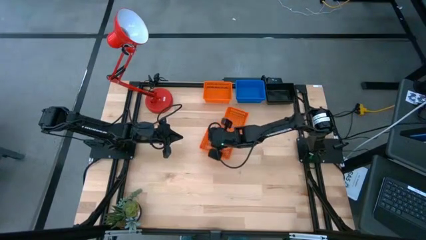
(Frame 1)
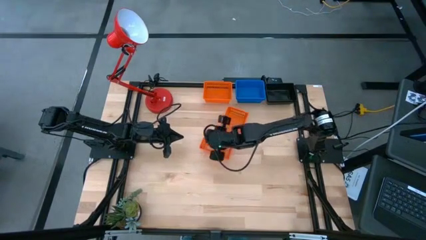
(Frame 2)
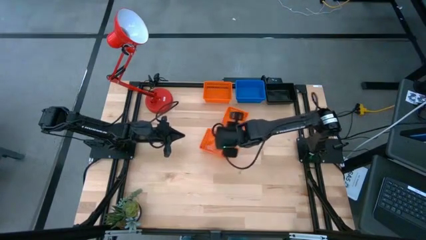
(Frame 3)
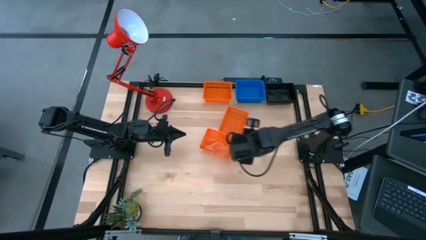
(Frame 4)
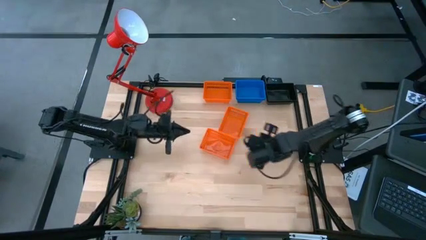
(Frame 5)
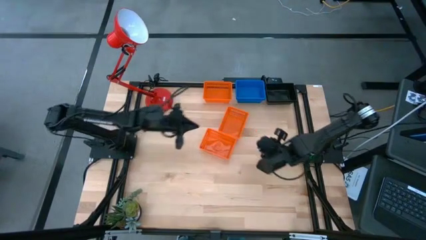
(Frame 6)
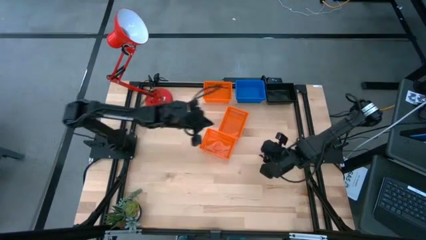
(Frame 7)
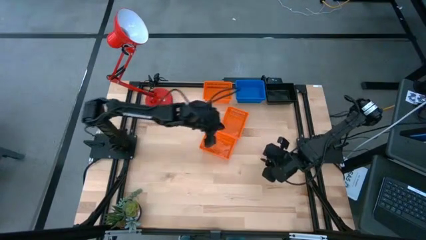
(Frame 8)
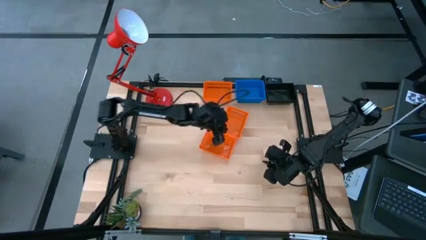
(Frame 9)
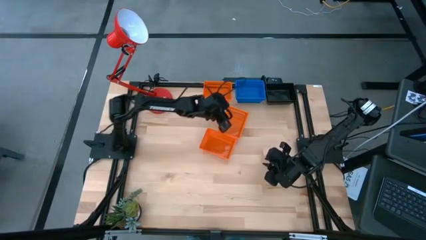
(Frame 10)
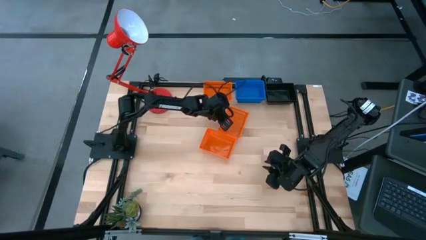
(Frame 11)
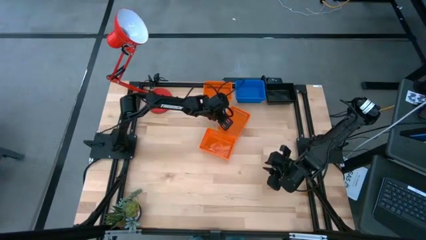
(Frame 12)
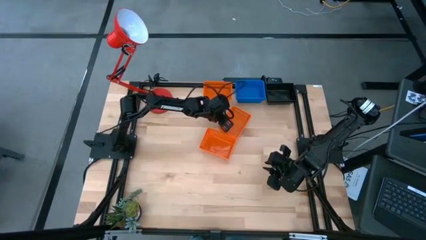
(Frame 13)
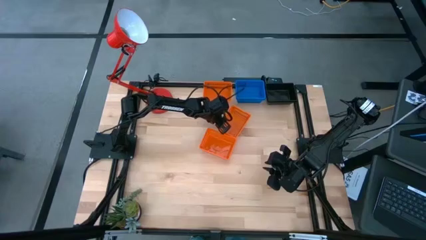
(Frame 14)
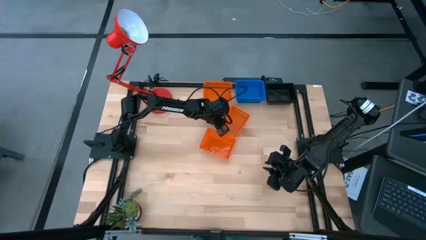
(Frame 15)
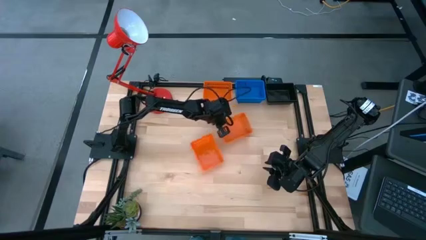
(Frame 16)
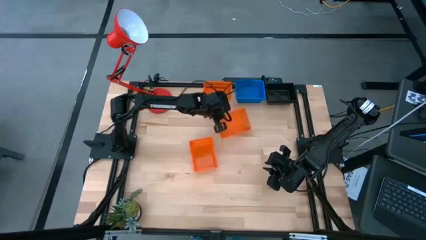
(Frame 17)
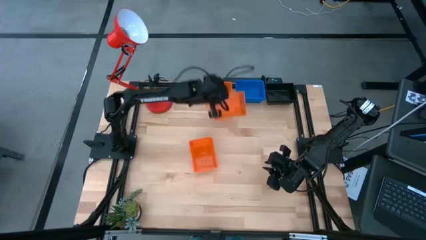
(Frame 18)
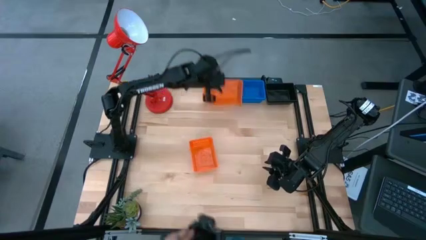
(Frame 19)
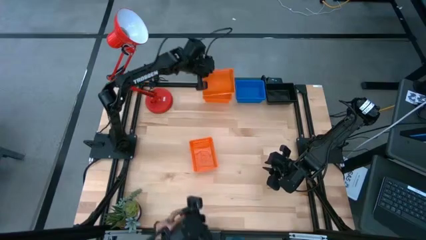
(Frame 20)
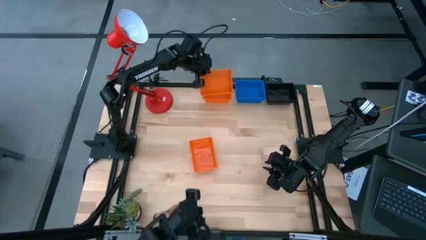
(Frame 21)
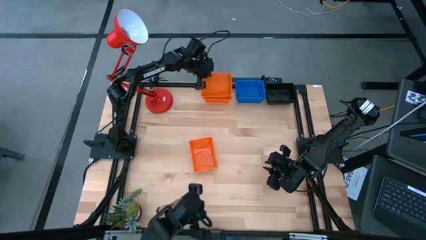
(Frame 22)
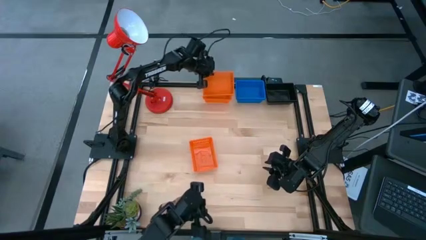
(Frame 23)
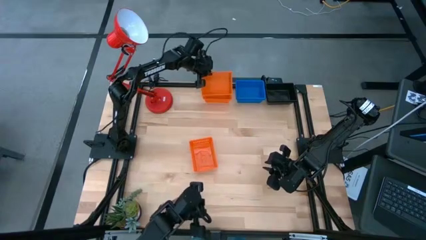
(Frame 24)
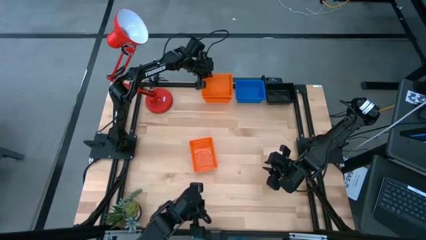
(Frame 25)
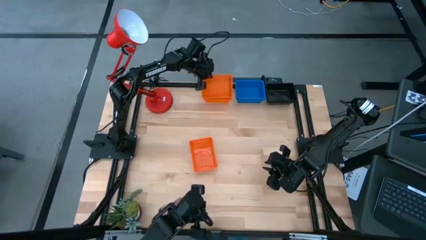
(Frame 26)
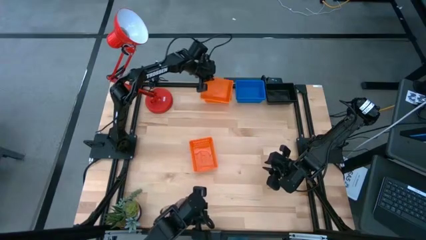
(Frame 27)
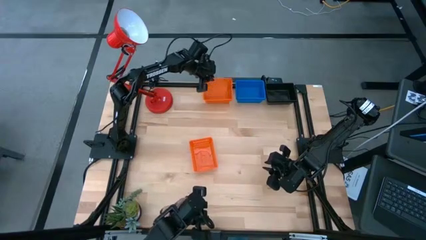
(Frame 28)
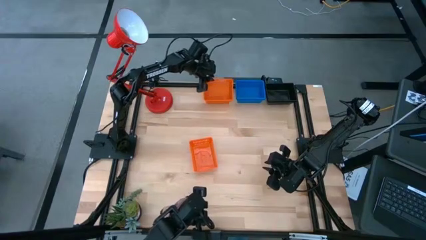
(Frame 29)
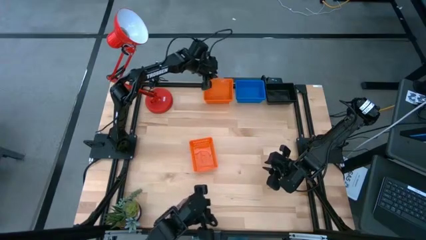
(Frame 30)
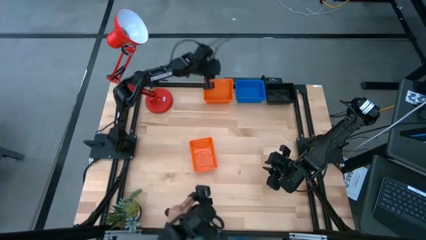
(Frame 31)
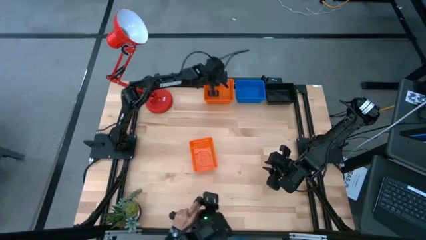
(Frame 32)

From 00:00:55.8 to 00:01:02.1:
Stack the middle orange bin on the top orange bin

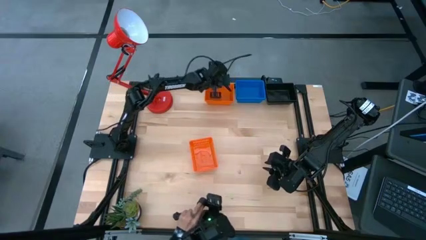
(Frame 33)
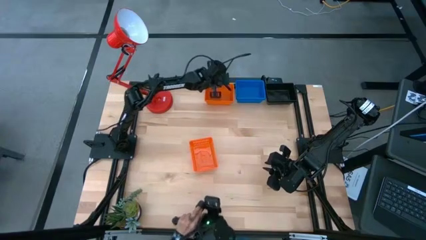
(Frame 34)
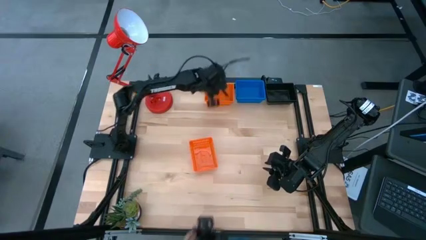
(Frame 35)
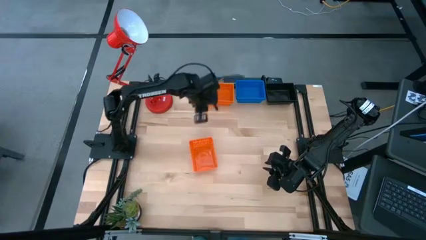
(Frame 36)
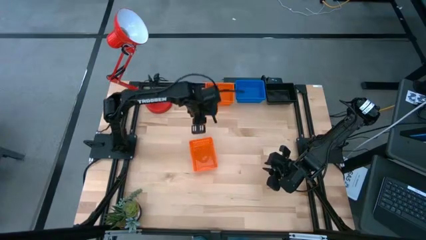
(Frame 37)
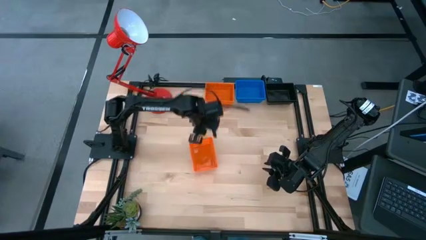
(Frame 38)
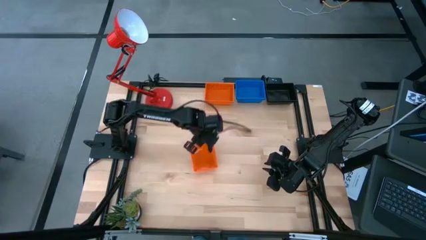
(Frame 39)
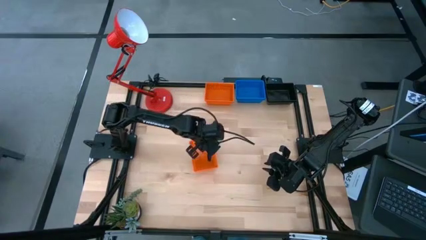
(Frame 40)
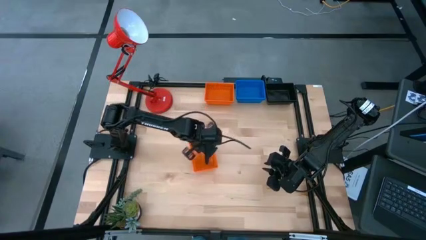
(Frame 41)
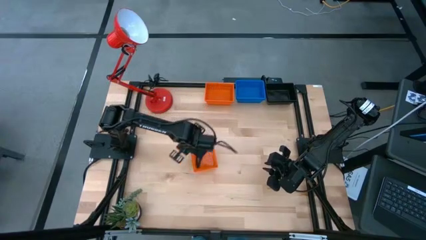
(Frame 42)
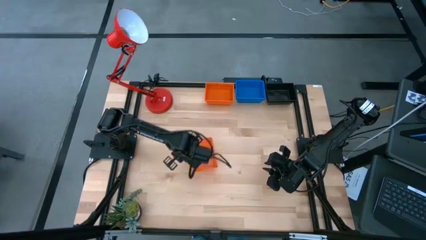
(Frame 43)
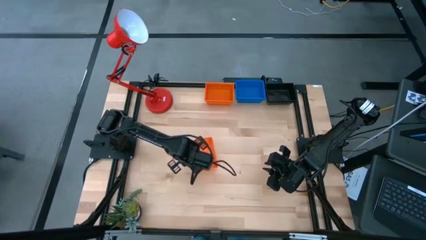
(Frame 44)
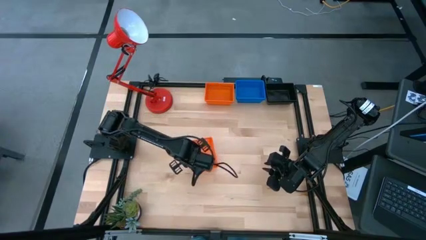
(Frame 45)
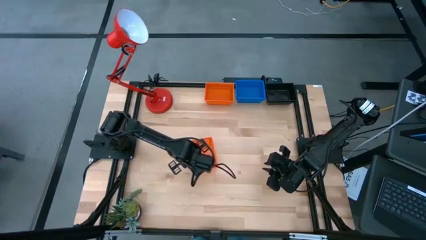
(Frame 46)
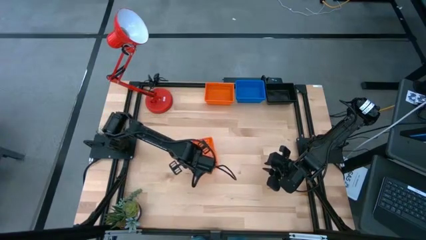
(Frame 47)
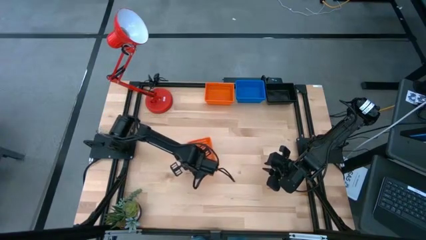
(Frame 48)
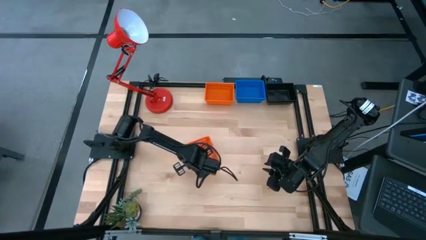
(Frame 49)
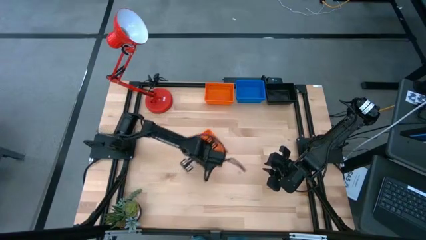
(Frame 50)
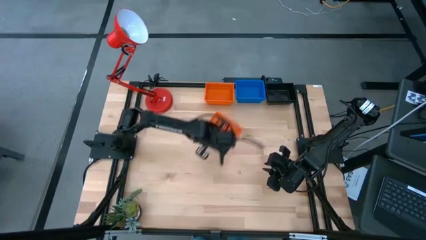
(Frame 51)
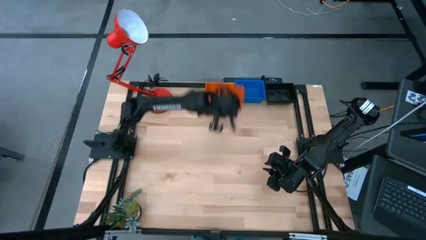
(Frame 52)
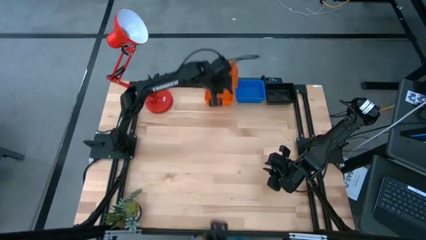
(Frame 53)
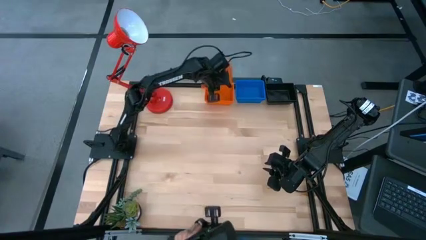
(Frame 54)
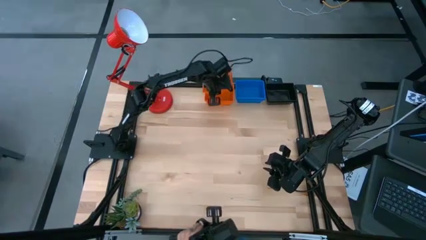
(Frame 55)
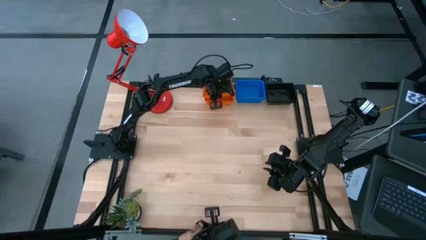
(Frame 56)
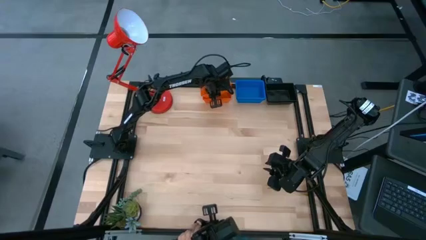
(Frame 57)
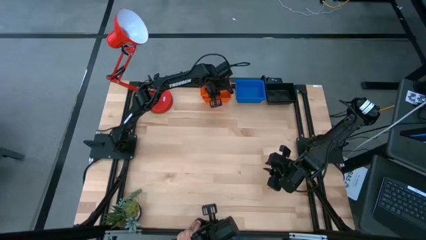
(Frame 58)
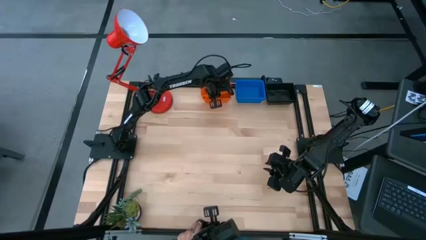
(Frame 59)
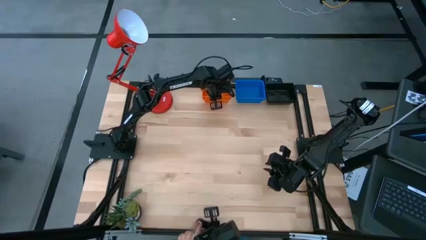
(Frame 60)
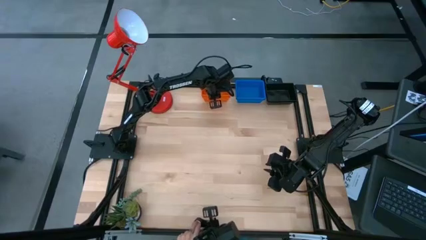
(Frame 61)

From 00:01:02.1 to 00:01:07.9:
Stack the bottom orange bin on the top orange bins

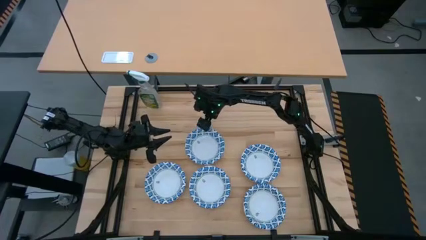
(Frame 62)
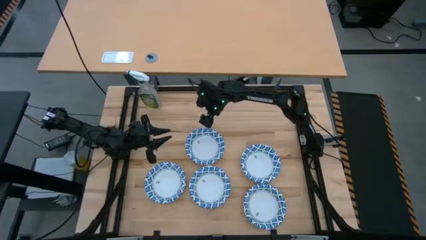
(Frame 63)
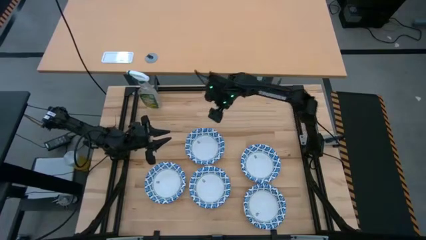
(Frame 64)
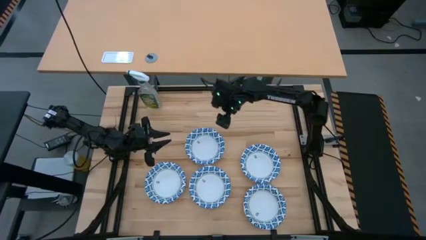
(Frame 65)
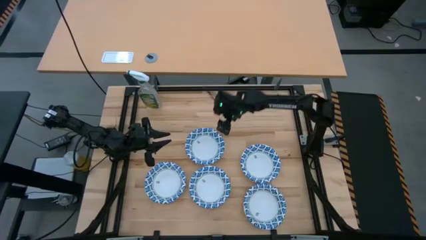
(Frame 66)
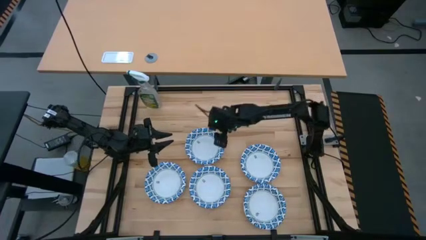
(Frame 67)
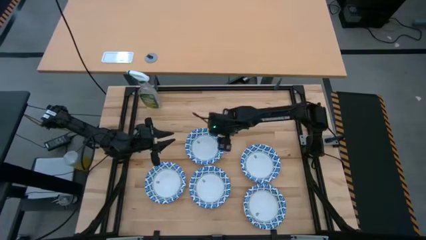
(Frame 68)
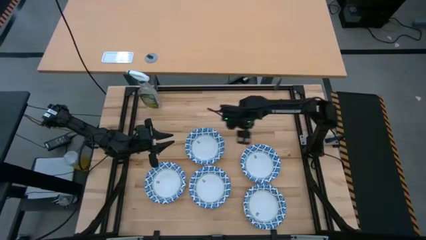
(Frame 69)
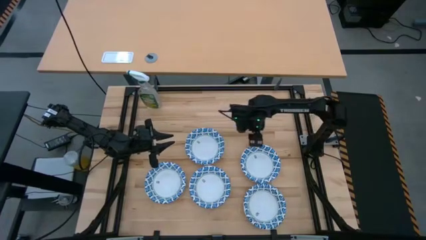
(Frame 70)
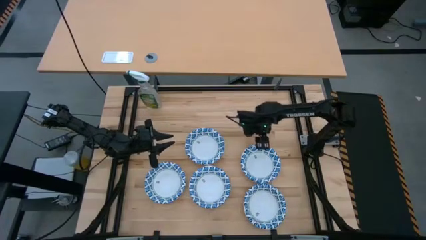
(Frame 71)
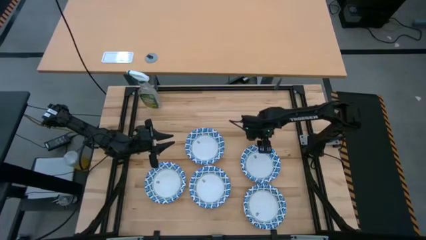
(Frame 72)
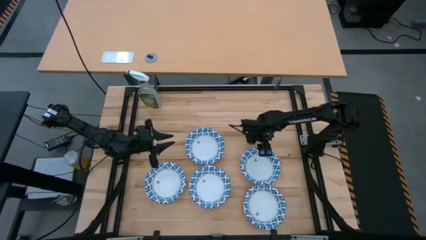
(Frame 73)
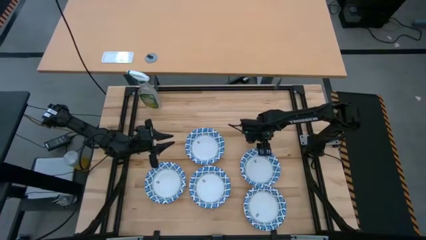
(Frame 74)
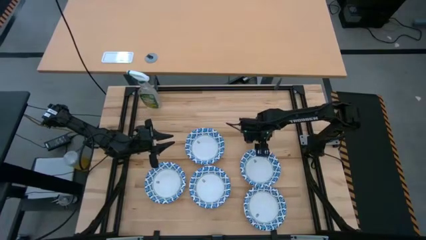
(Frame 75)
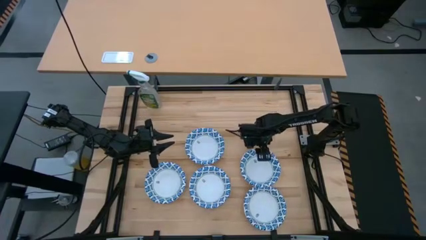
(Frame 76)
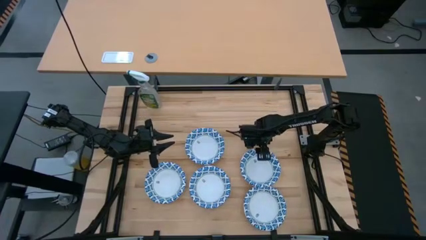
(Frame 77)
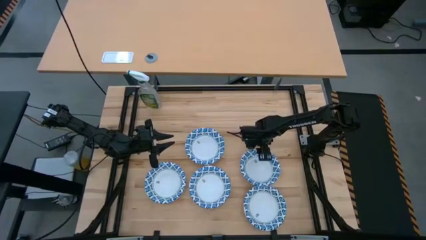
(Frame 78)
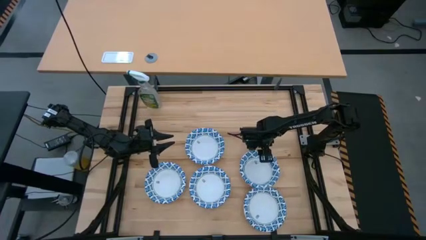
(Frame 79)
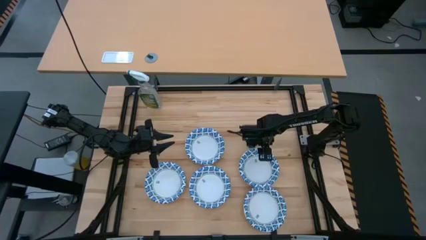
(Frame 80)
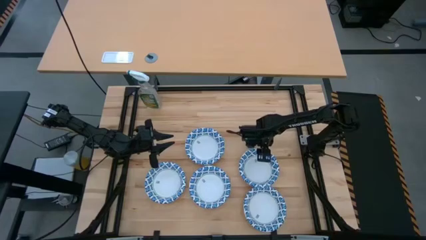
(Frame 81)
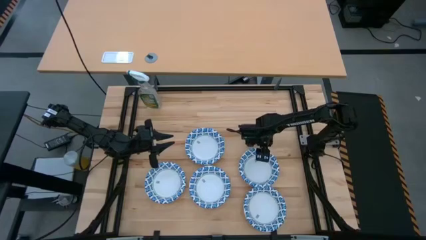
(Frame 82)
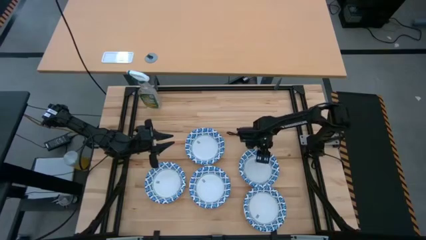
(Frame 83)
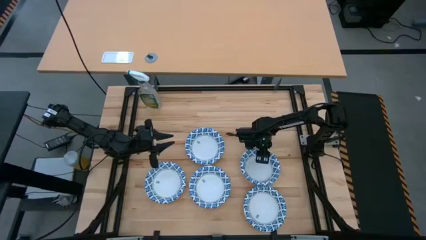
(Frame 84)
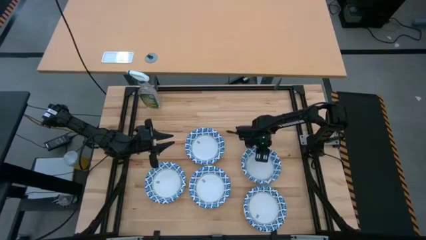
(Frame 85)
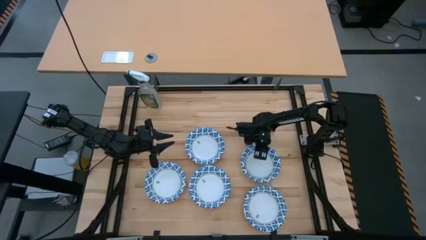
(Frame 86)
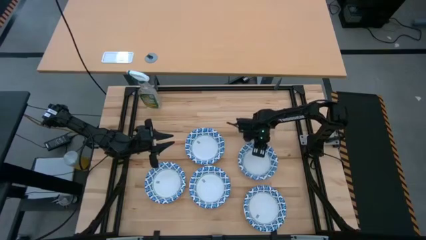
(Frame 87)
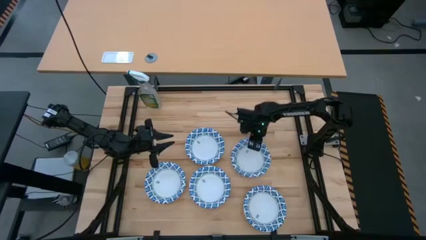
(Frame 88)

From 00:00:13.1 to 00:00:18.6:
Put the white bowl on top of the white bowl
